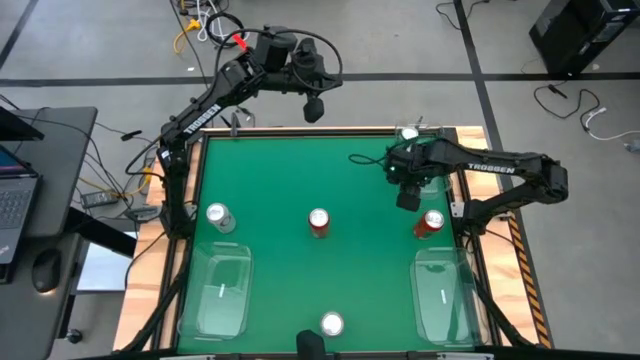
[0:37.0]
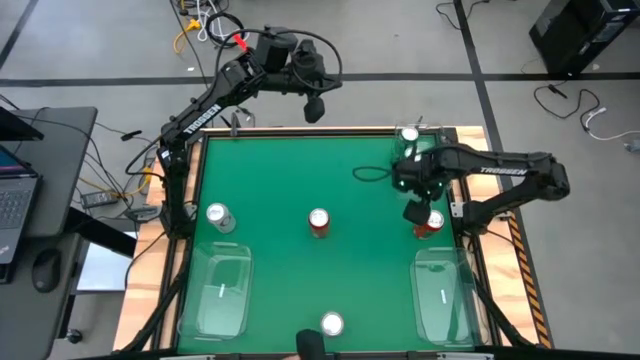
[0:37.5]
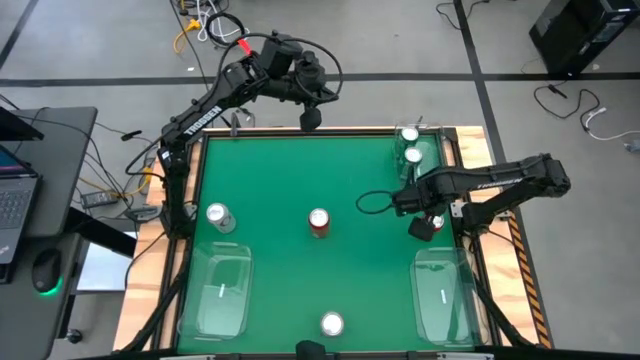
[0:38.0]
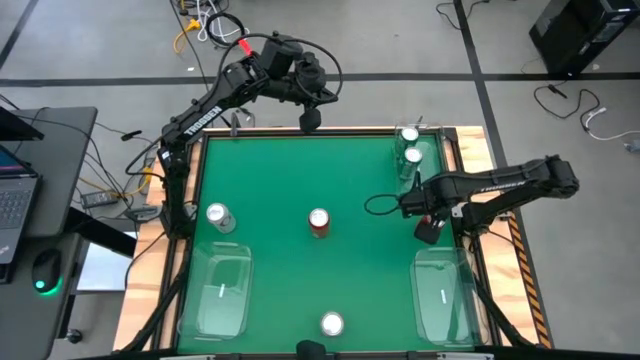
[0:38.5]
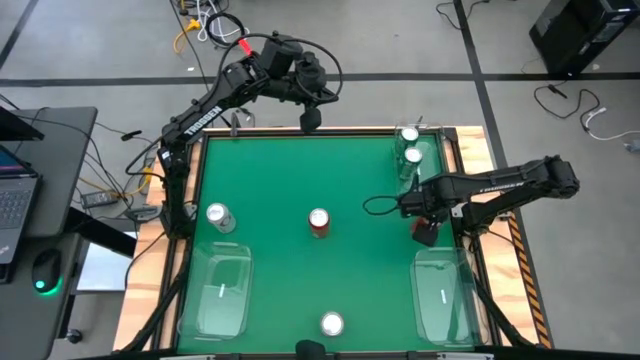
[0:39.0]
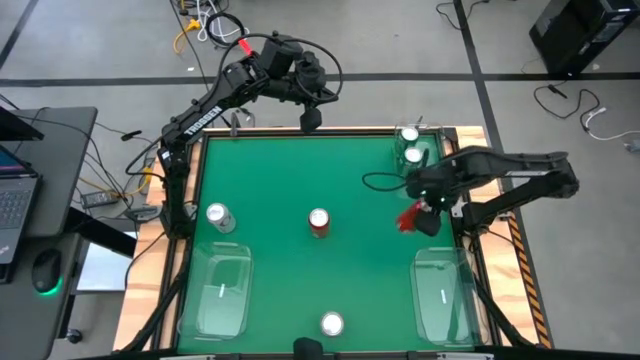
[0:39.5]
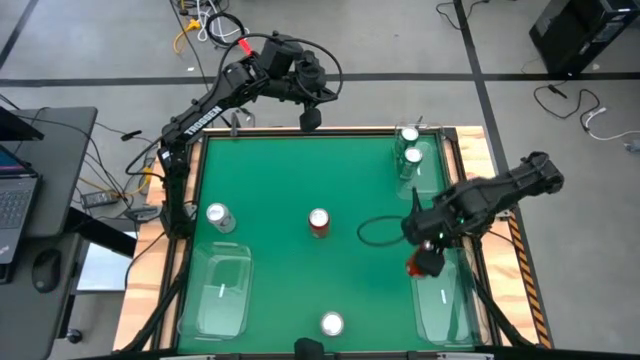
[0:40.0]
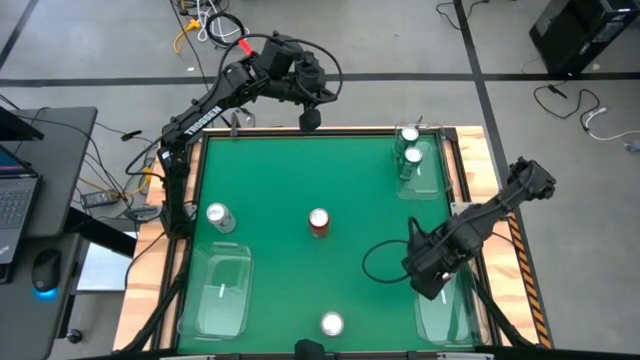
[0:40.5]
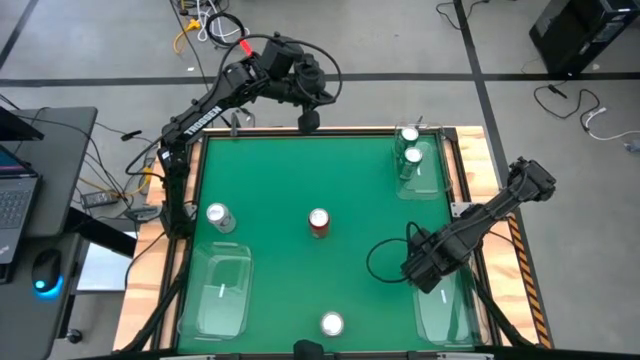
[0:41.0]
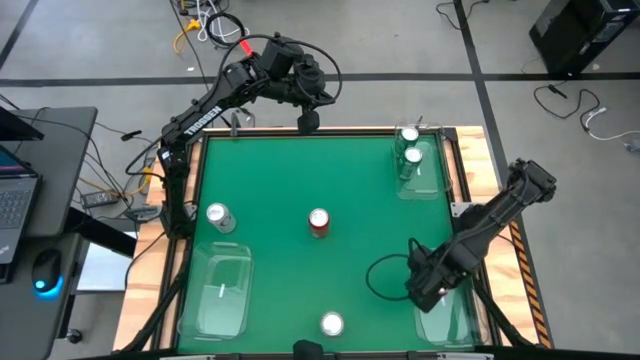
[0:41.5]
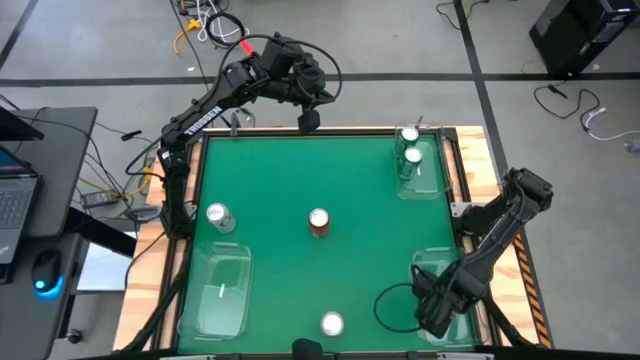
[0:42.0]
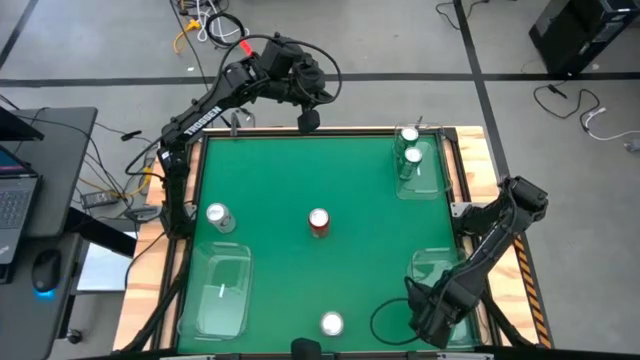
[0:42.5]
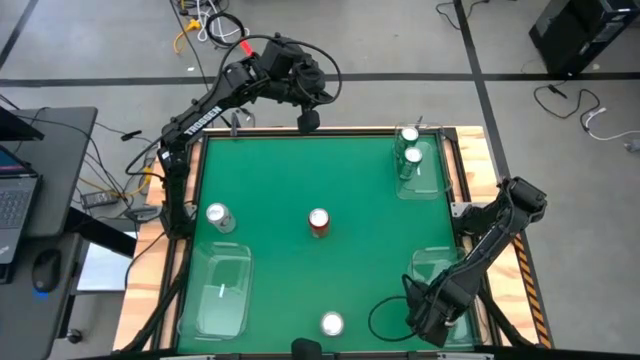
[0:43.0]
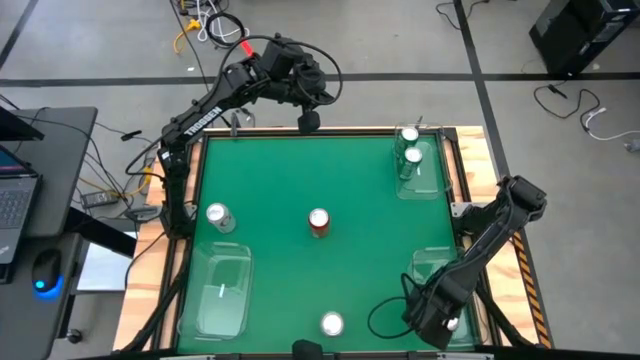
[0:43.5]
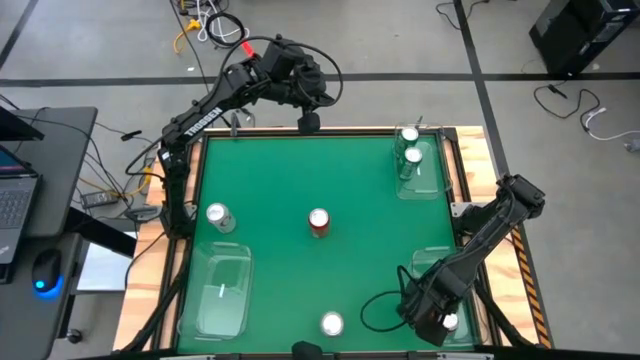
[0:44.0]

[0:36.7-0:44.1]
Task: Sort soda cans
Put the right red/black soda can into the right transparent bin

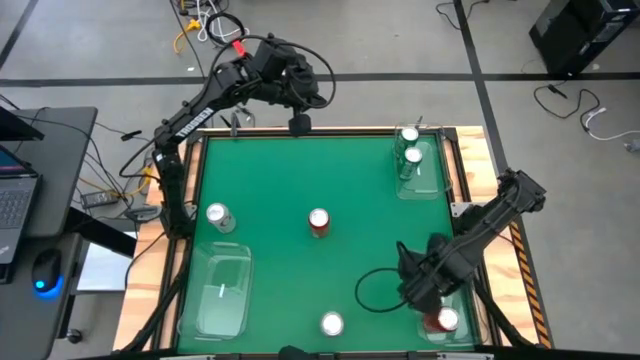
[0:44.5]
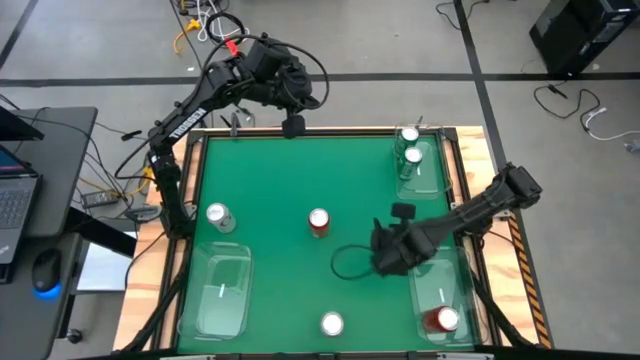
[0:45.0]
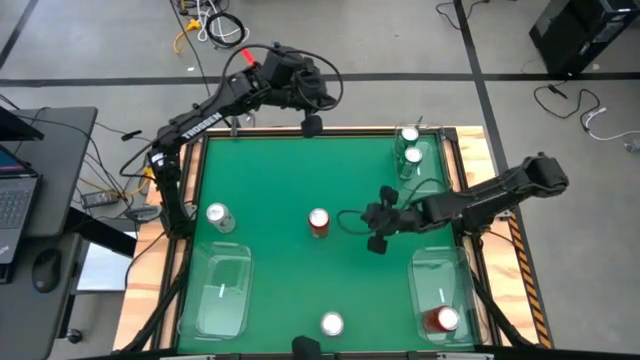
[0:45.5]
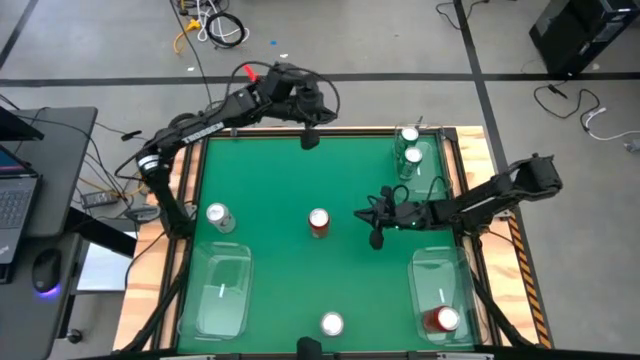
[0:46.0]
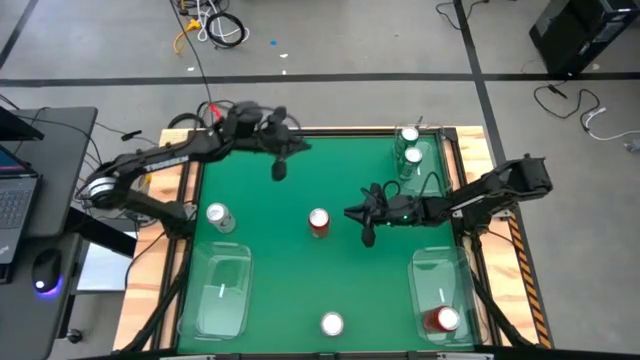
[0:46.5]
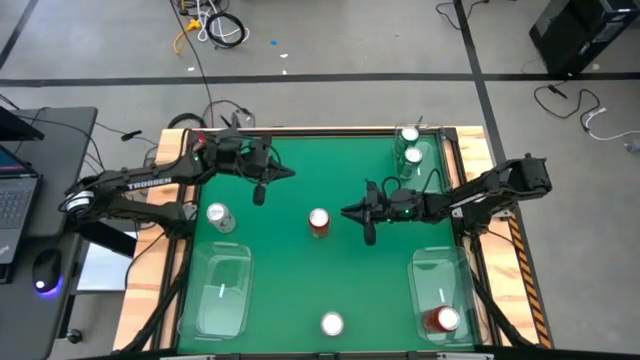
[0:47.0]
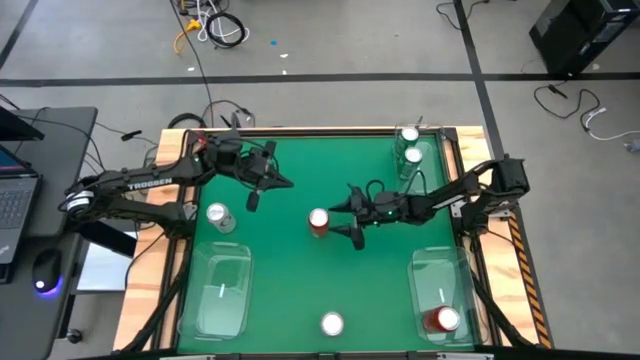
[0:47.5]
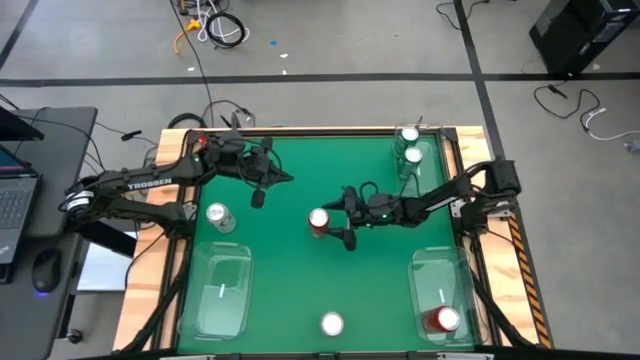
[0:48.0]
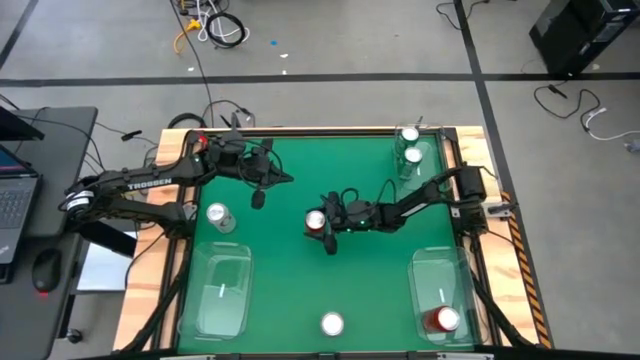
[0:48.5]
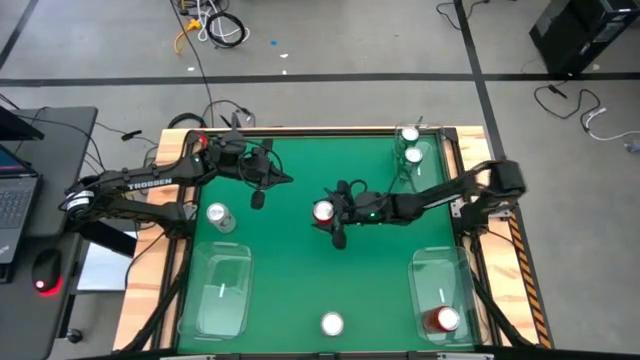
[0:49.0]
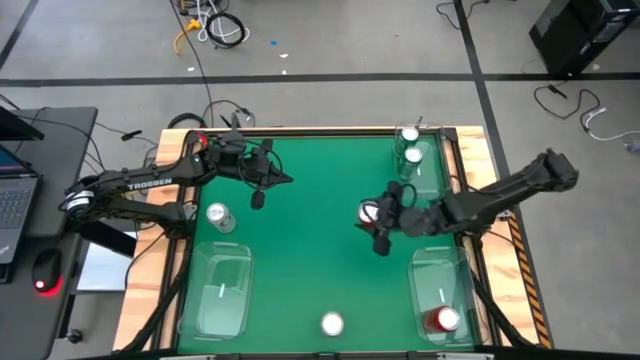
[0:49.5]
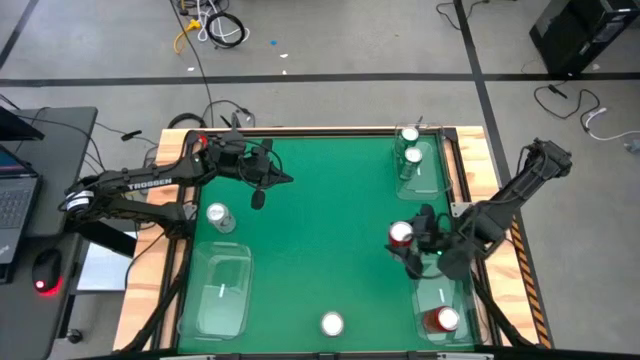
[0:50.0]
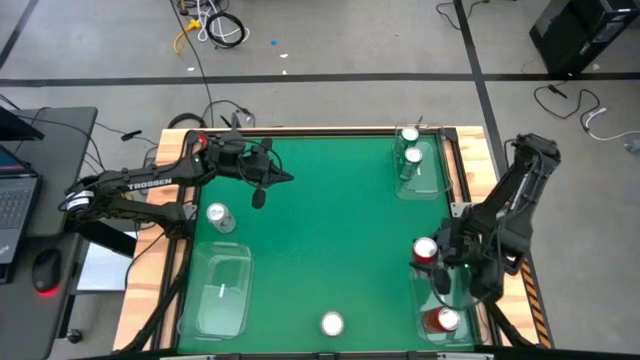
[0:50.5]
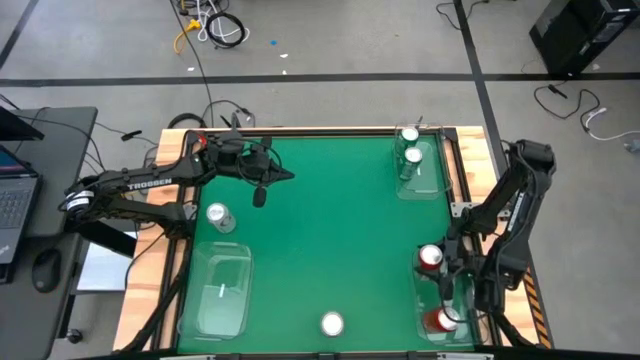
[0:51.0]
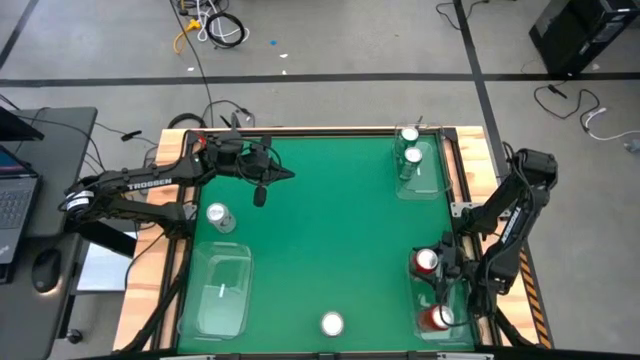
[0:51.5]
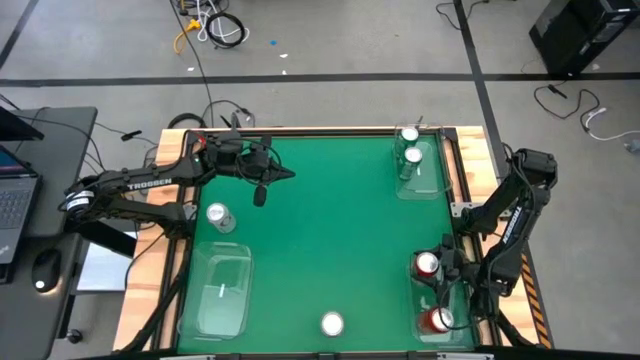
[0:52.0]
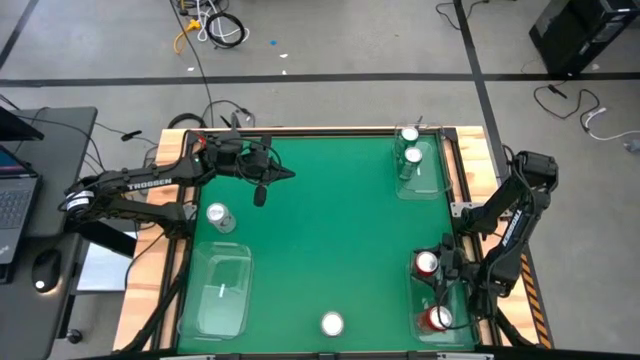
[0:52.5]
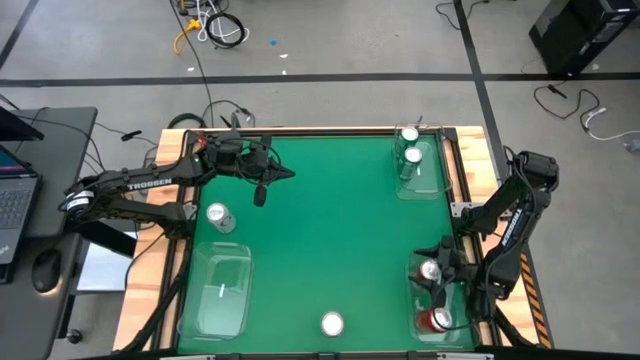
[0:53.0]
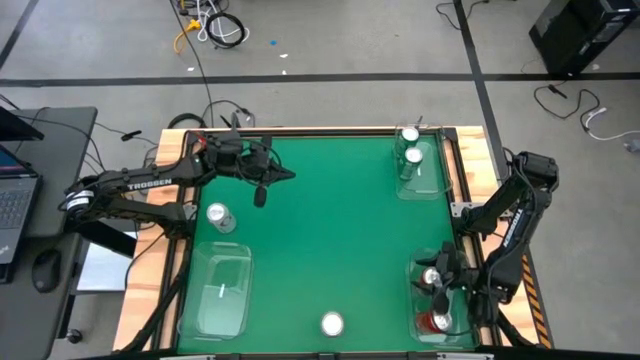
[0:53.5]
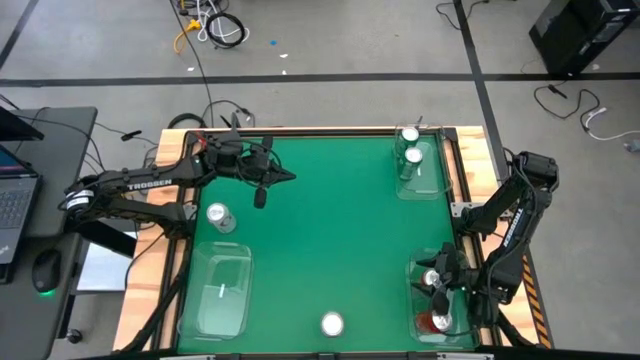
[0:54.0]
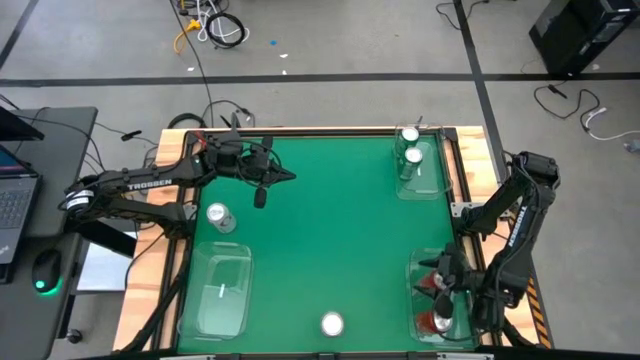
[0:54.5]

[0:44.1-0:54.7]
Put the left red/black soda can into the right transparent bin

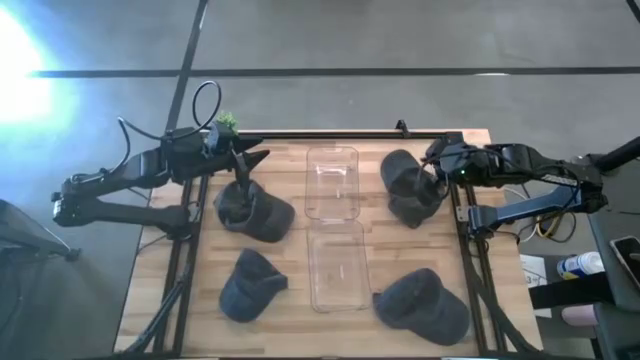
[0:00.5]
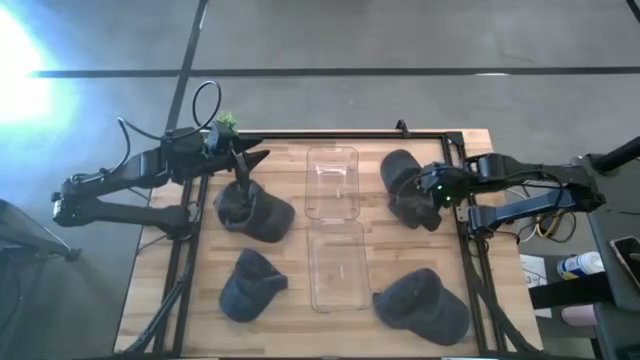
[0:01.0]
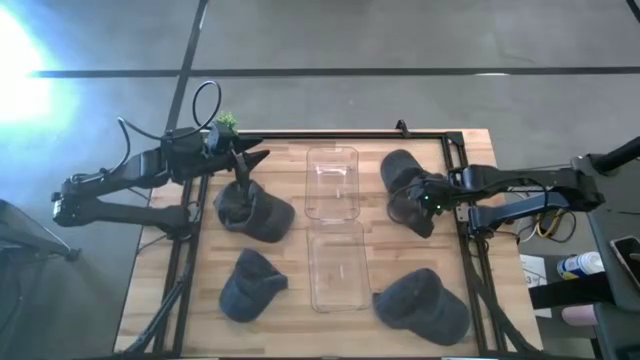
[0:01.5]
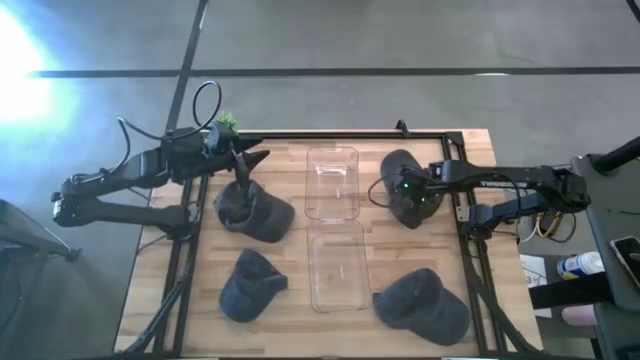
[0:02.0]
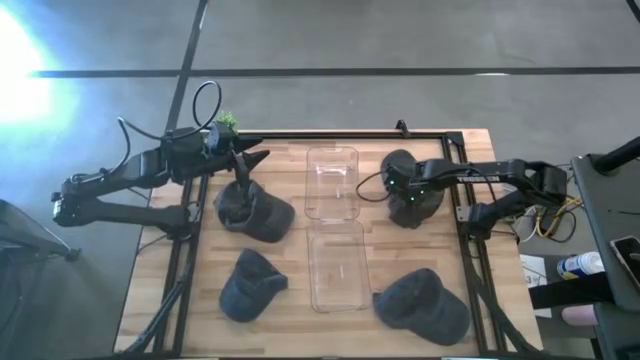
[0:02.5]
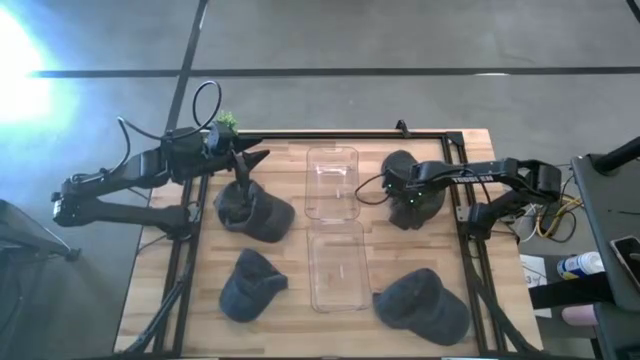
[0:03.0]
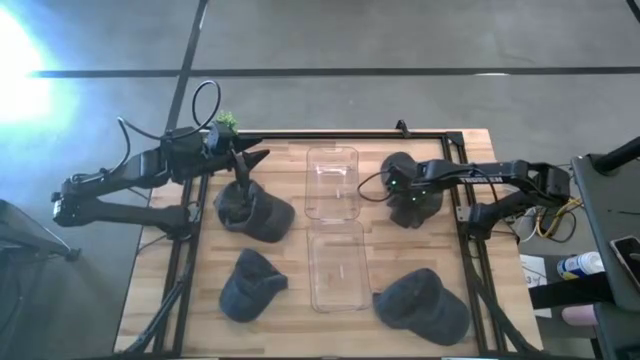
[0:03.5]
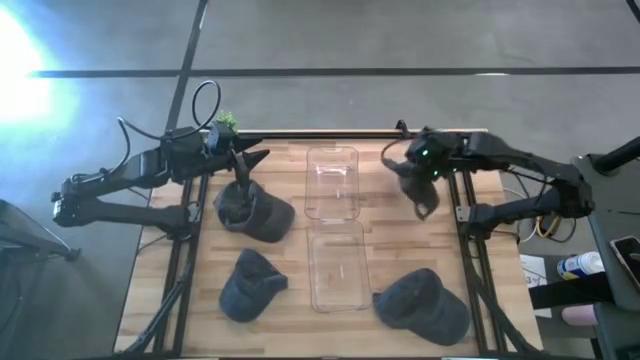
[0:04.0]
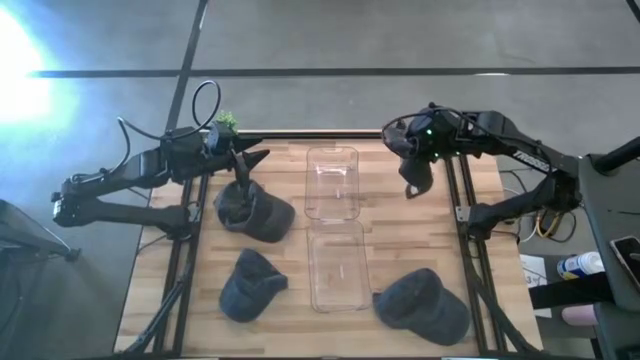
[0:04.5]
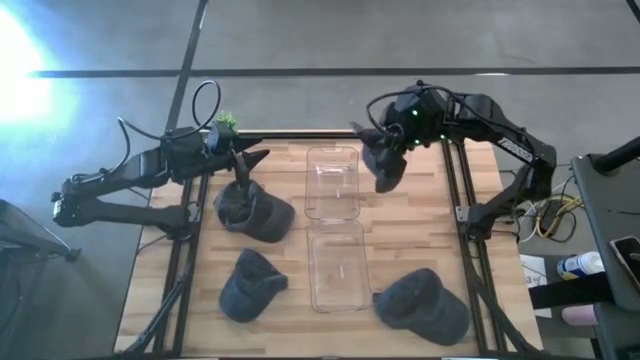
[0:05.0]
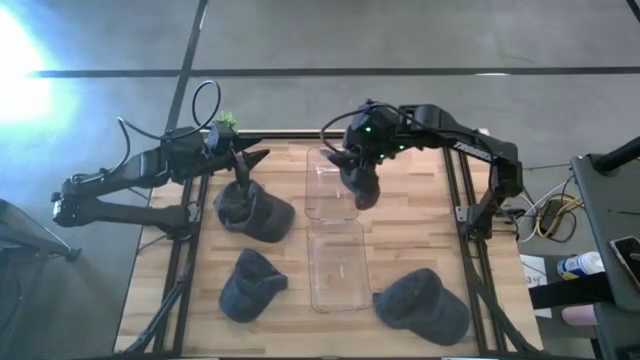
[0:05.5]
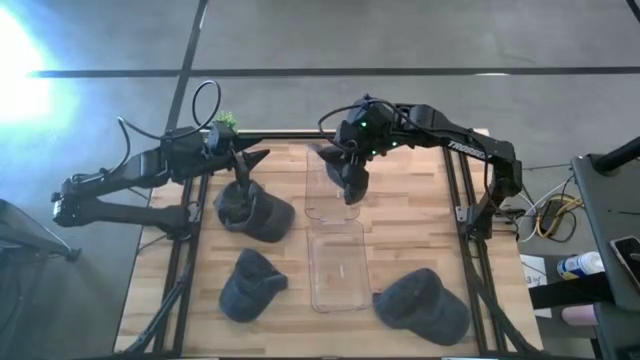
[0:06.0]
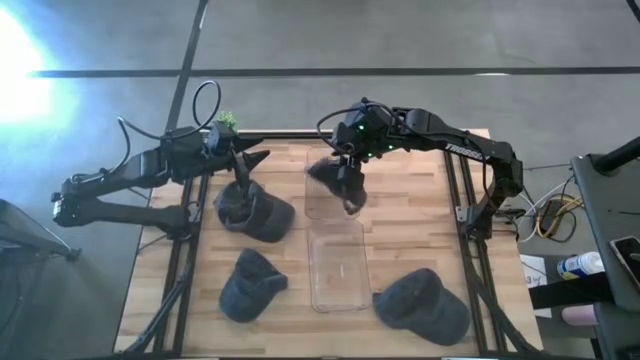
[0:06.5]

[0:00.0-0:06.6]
Task: Pick & Place hat
Put the right gray cap into the top transparent bin
